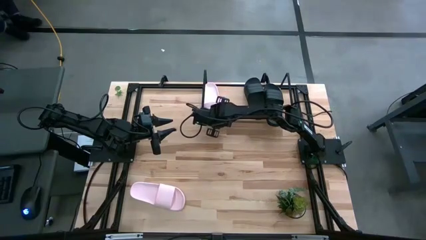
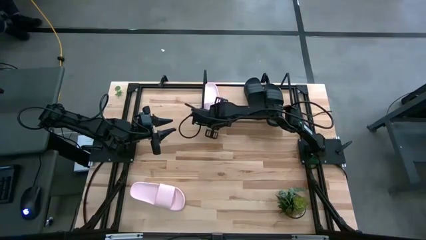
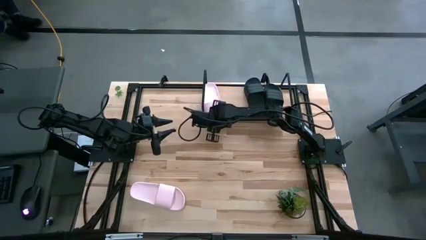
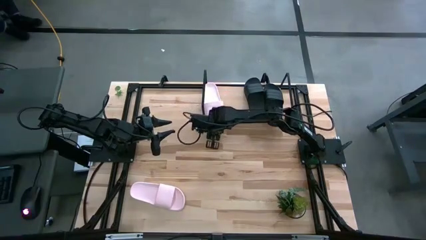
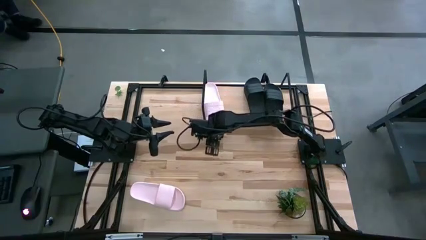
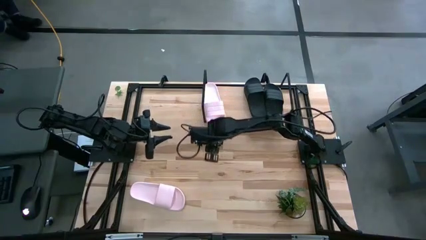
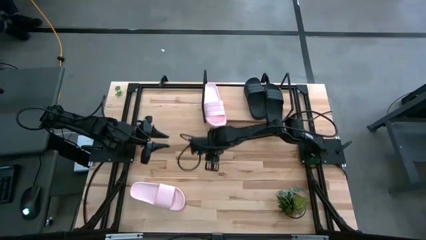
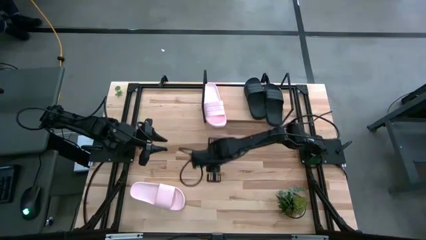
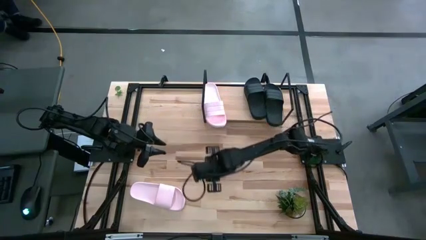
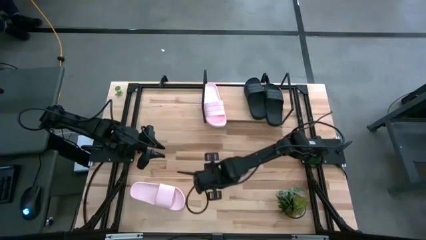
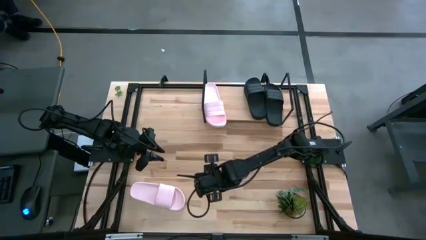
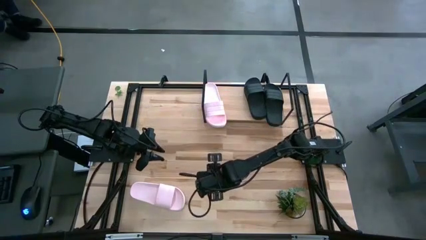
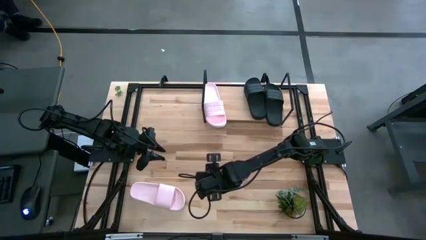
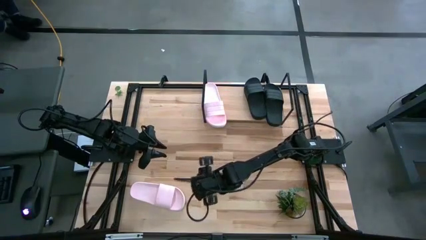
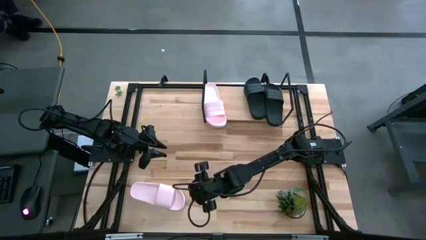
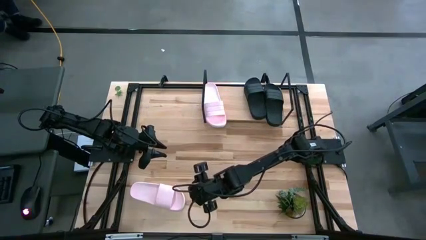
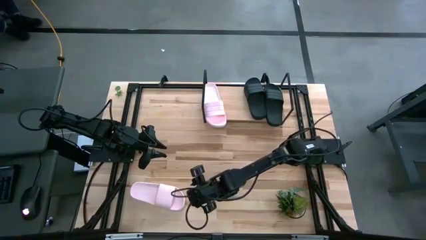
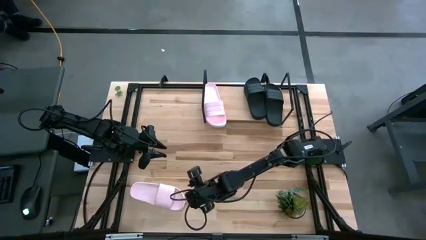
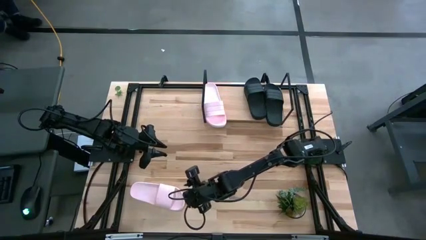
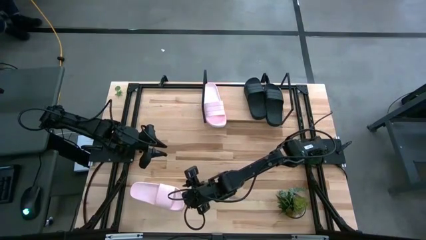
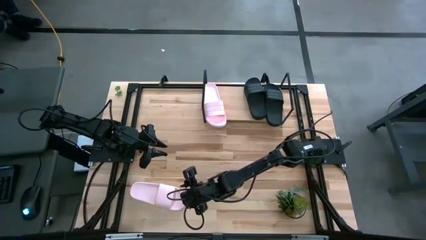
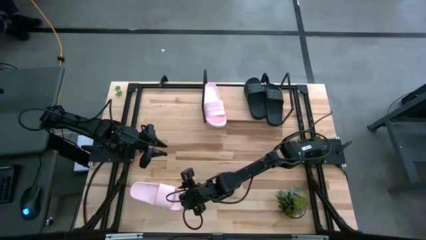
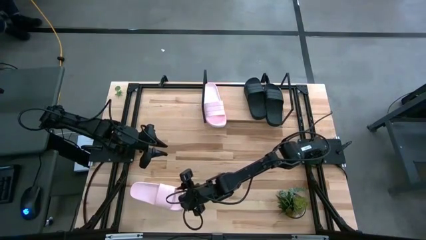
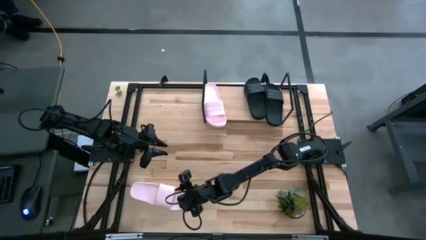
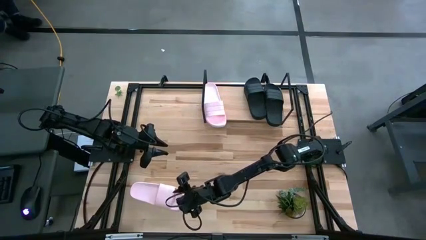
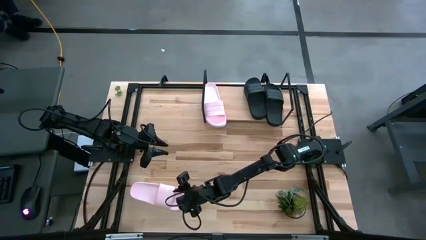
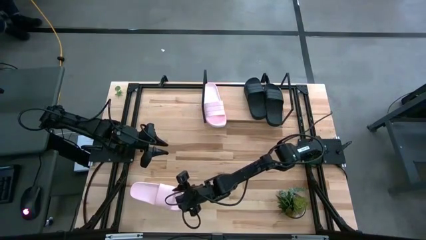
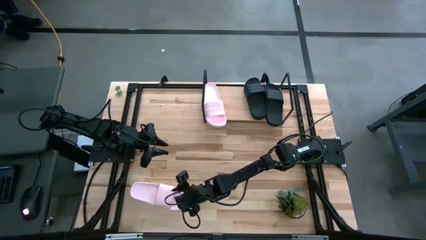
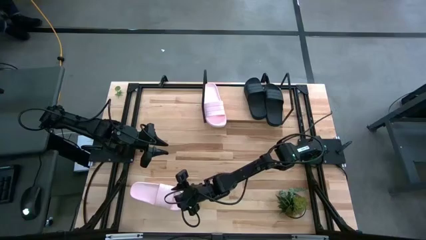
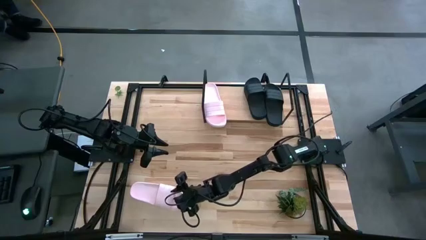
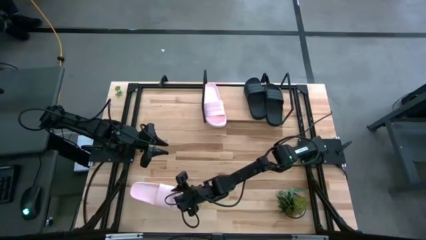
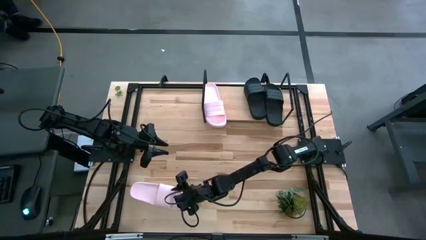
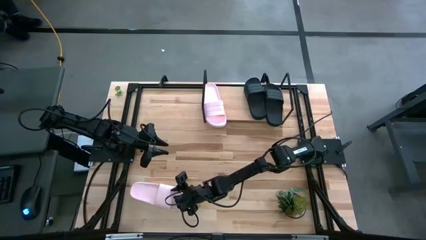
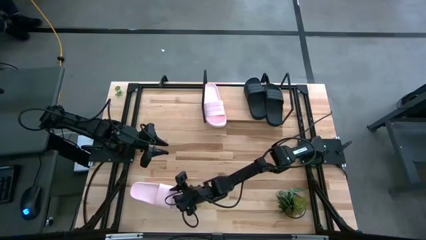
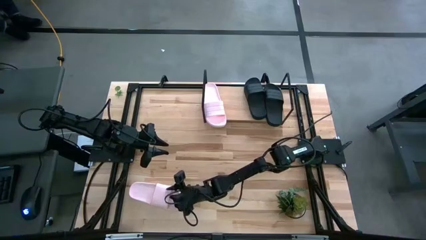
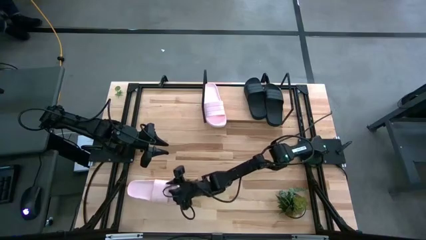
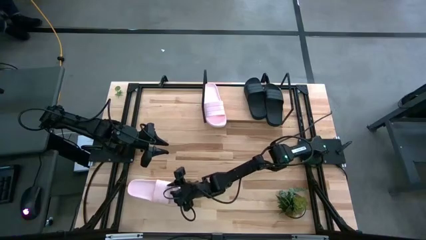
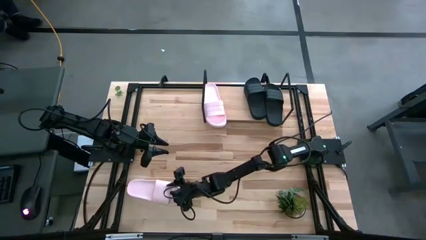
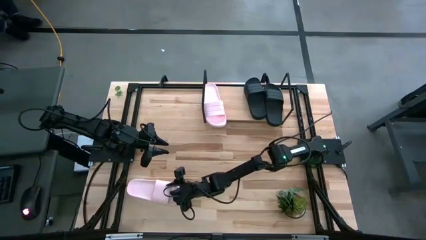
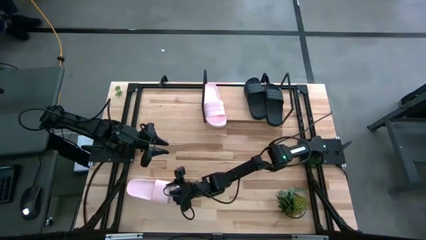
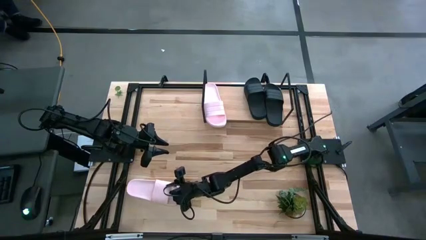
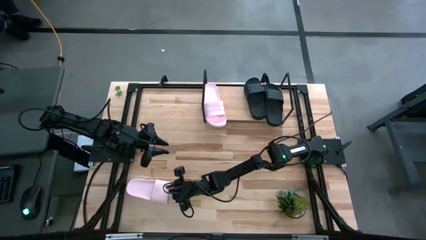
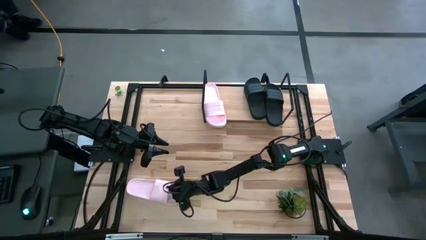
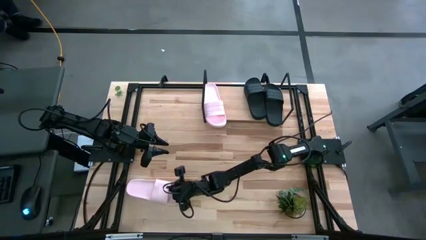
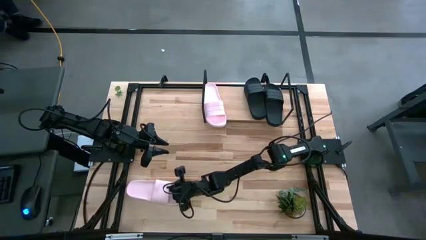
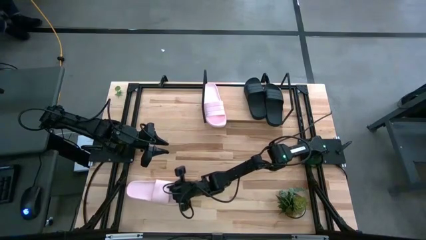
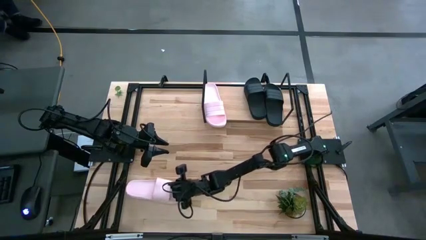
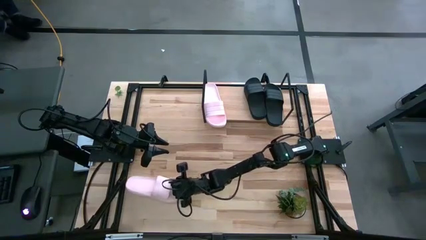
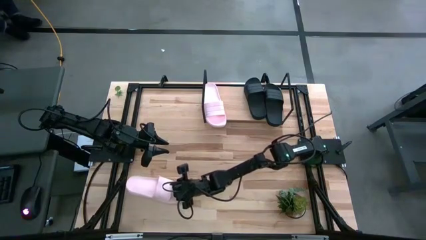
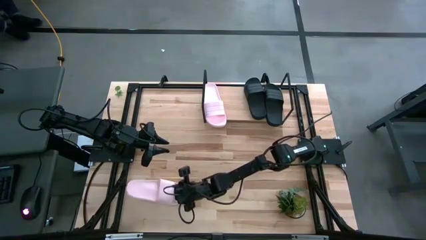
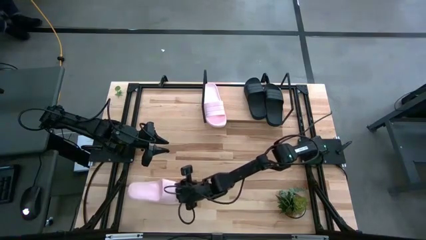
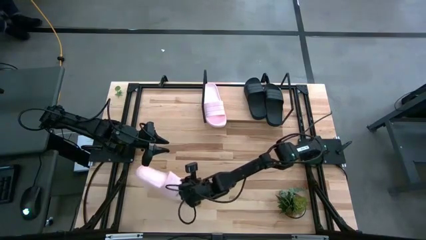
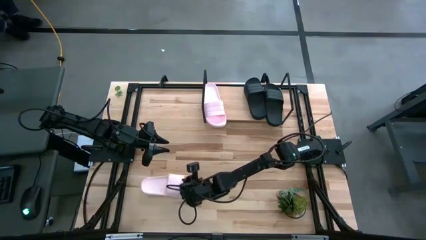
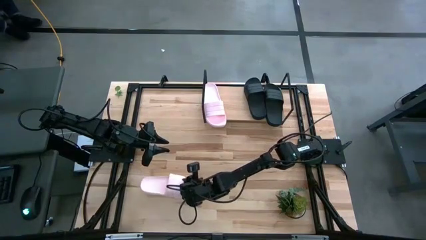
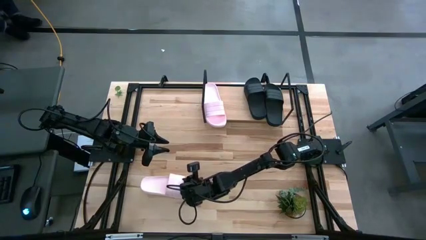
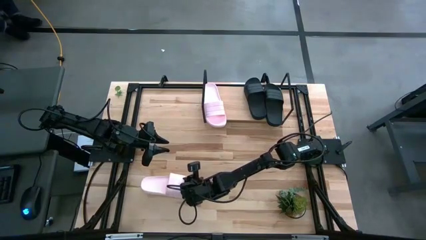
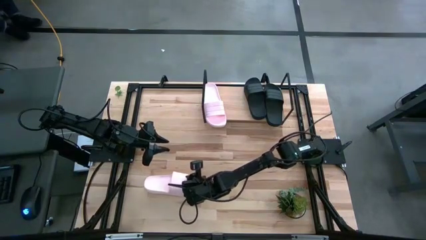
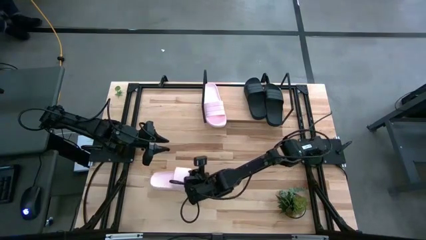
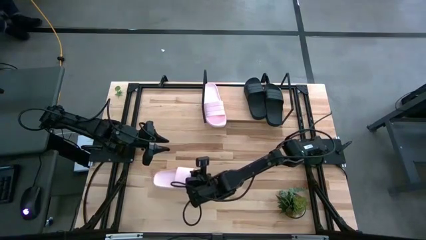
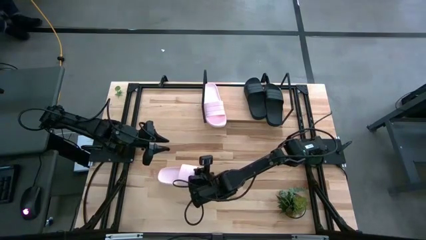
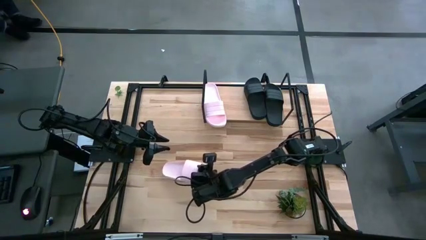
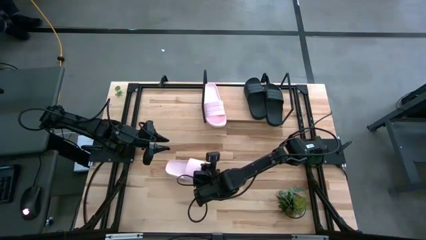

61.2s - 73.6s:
Task: Pick and place slides into the shelf
Put the pink slides on the shelf

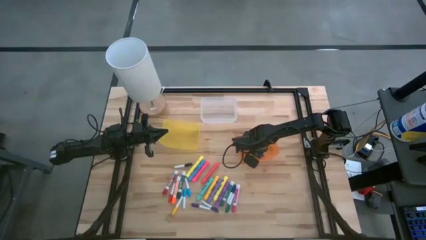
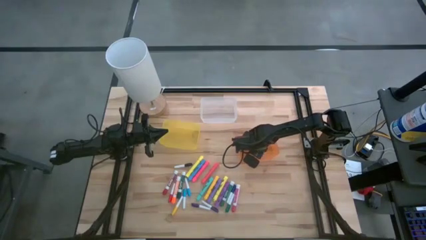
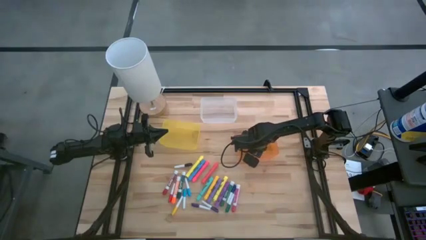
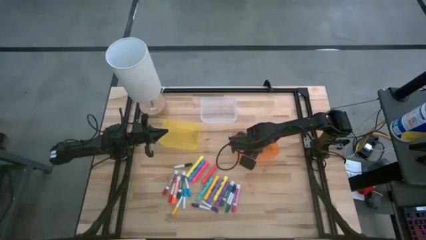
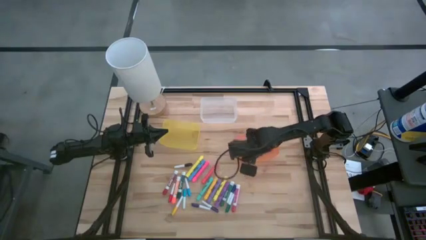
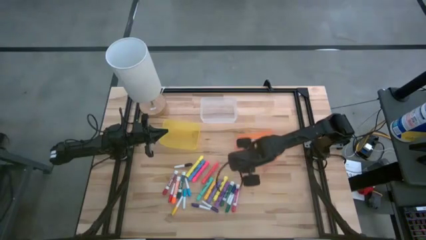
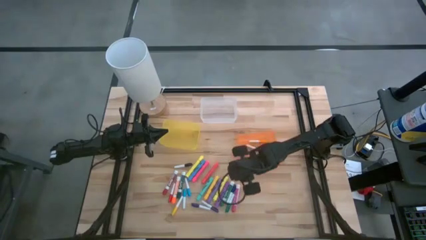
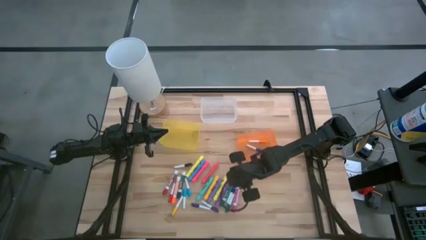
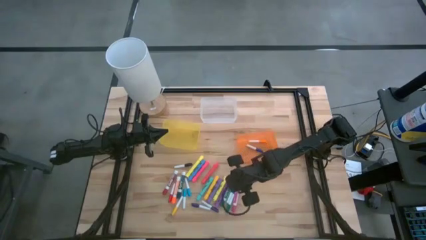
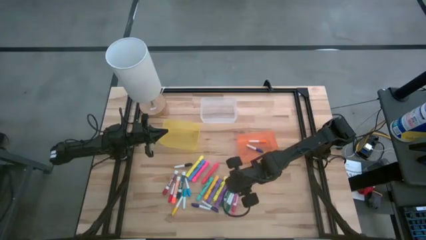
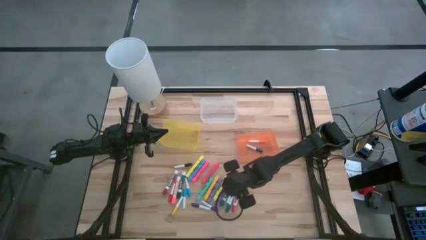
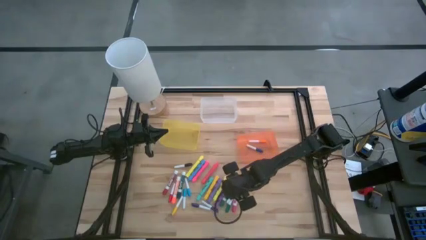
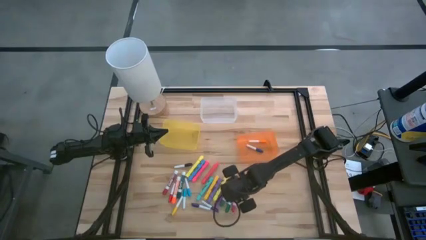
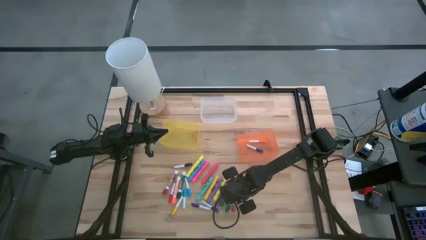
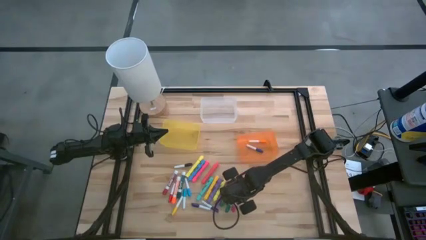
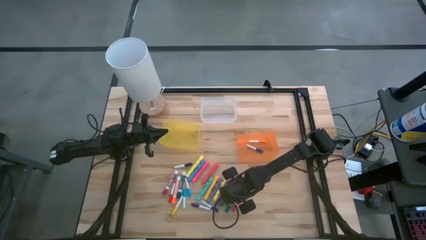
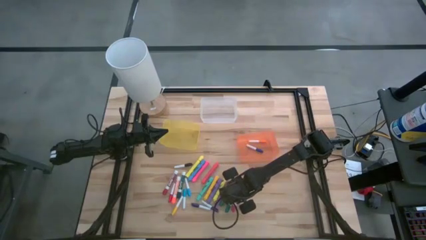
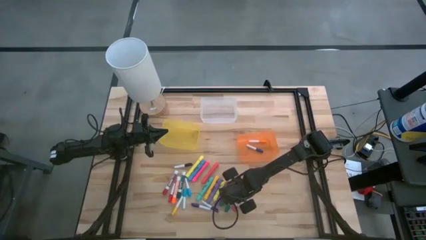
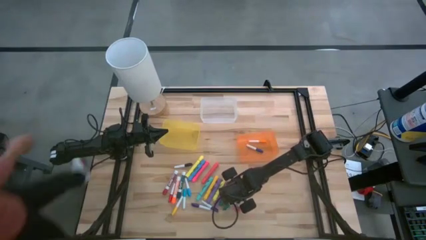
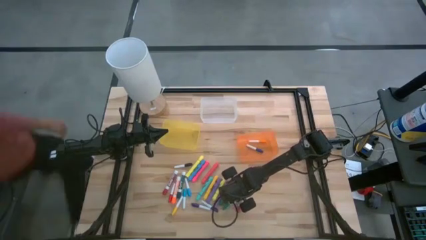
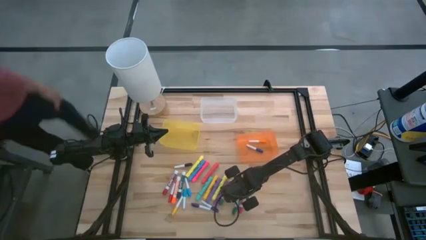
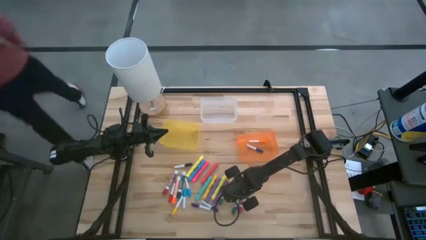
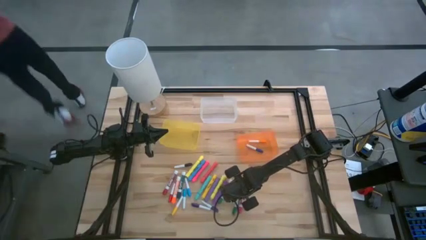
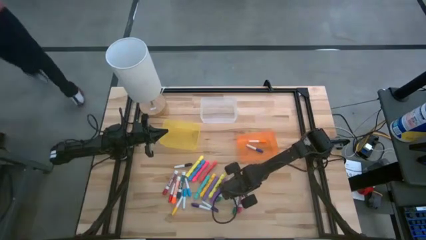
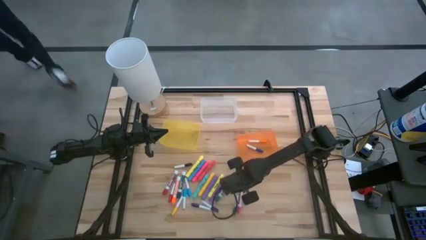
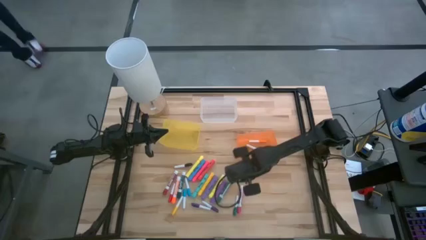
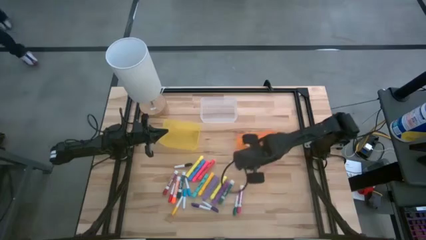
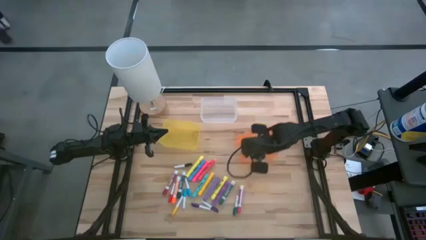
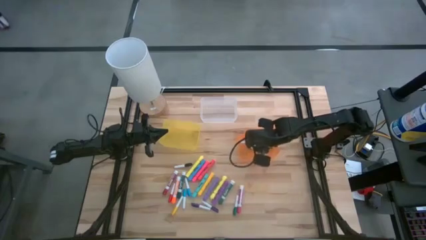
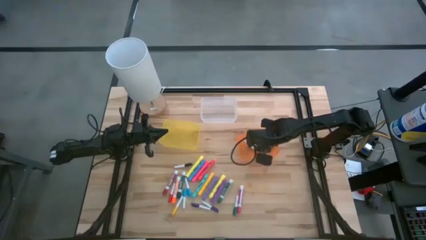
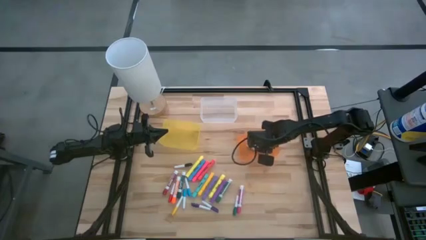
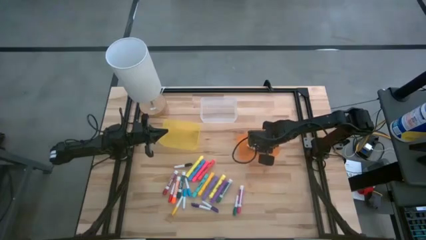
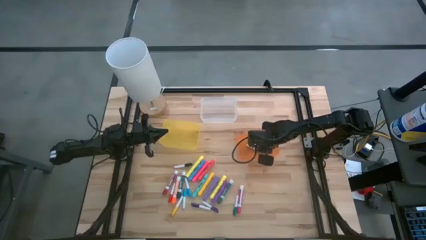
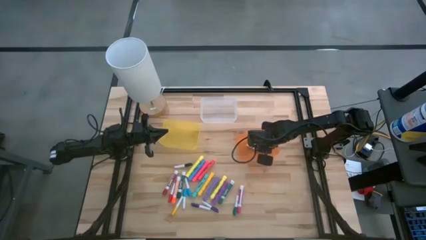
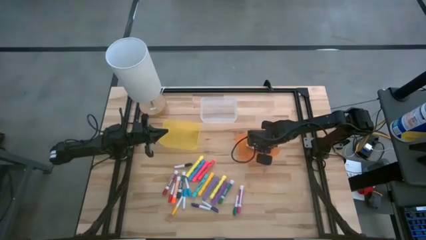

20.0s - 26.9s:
Task: Pick & Place Markers
Put the small blue highlighter pen into the orange bin
